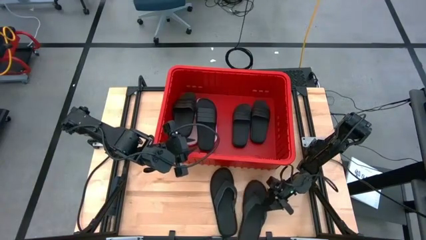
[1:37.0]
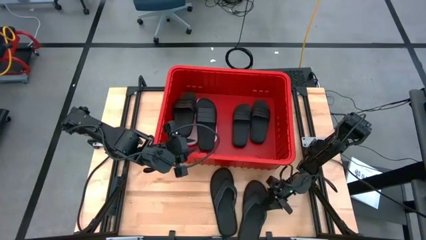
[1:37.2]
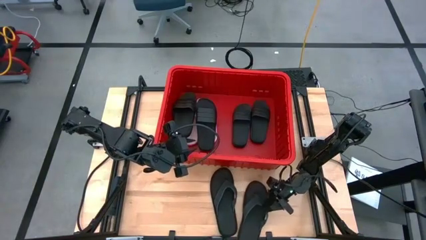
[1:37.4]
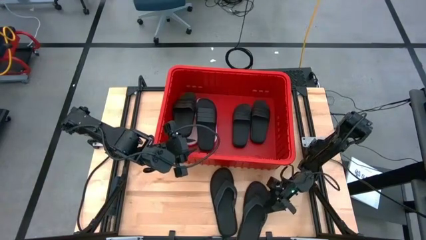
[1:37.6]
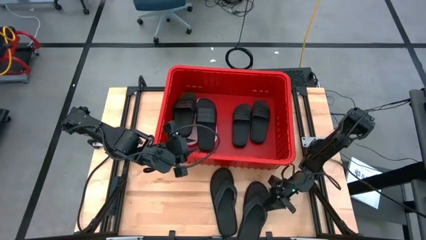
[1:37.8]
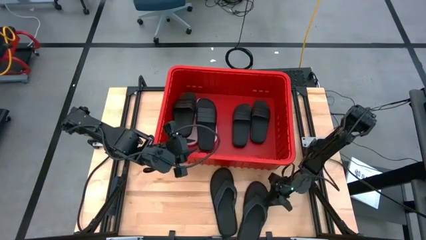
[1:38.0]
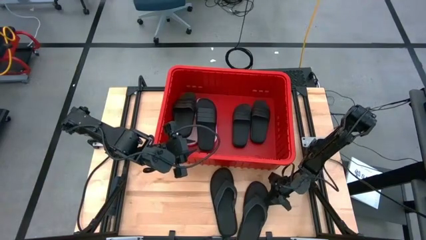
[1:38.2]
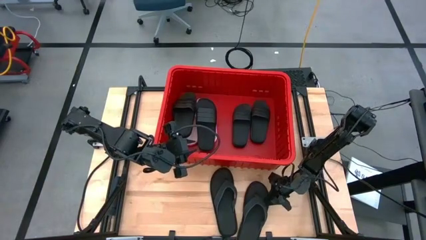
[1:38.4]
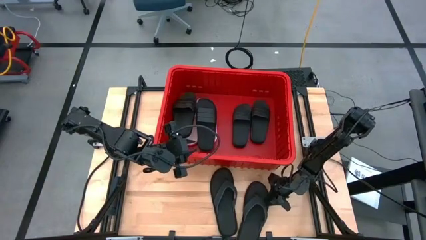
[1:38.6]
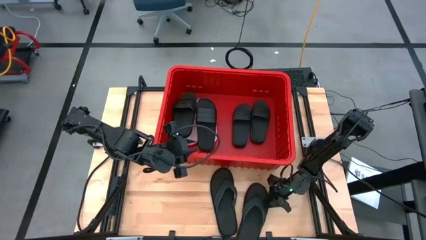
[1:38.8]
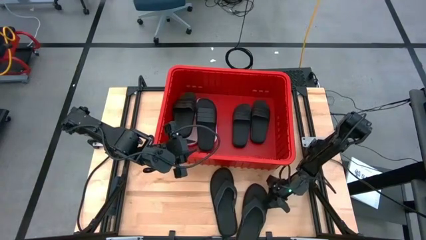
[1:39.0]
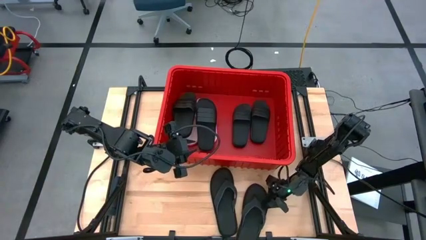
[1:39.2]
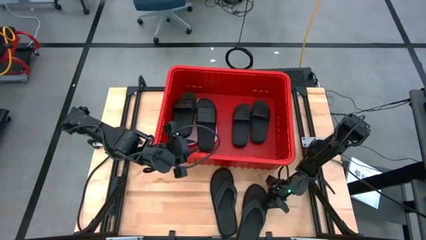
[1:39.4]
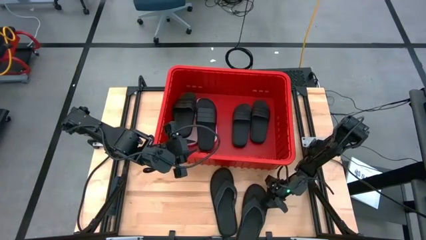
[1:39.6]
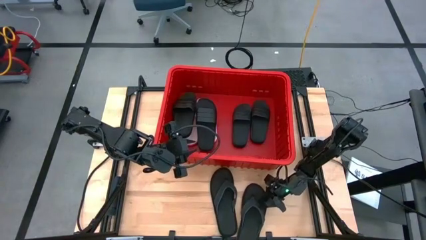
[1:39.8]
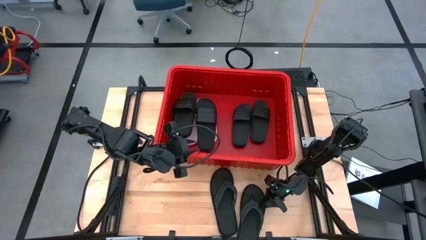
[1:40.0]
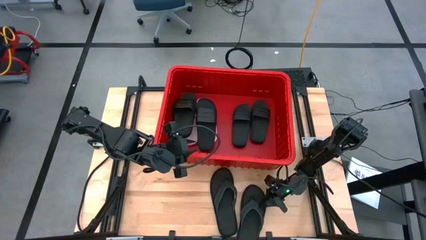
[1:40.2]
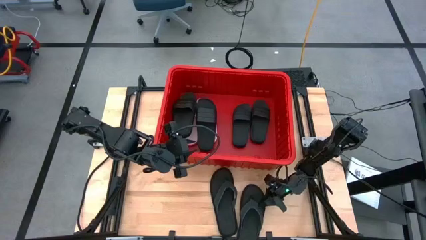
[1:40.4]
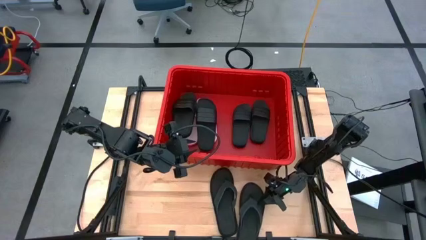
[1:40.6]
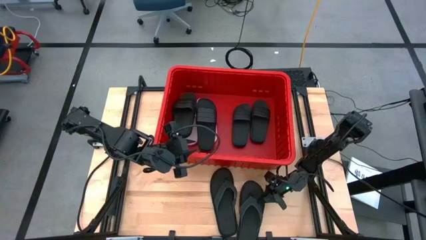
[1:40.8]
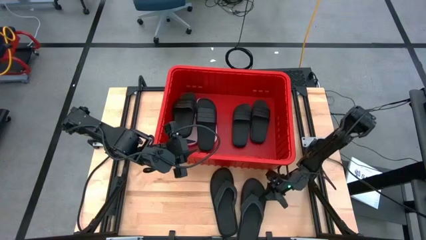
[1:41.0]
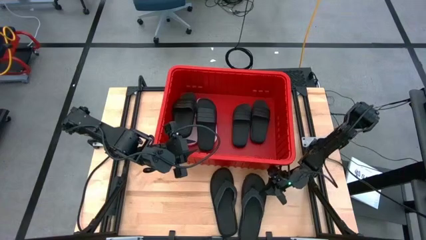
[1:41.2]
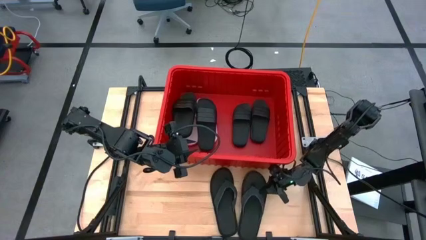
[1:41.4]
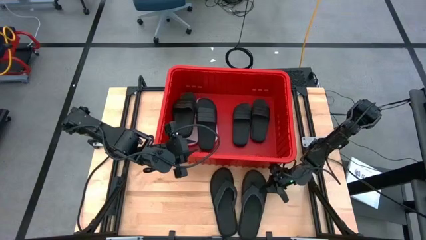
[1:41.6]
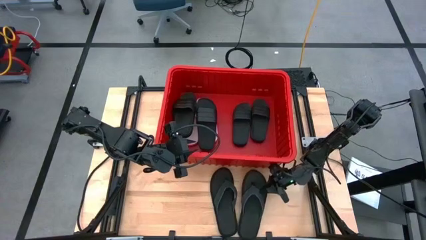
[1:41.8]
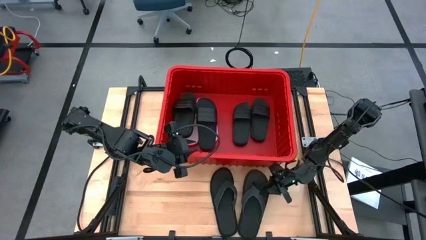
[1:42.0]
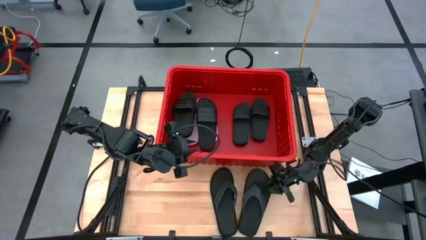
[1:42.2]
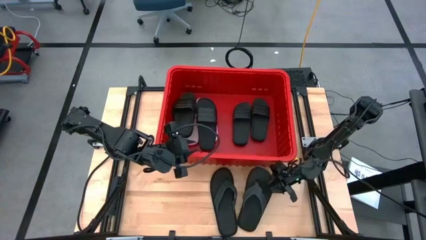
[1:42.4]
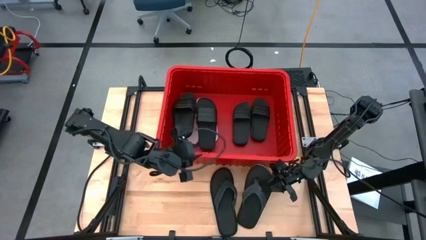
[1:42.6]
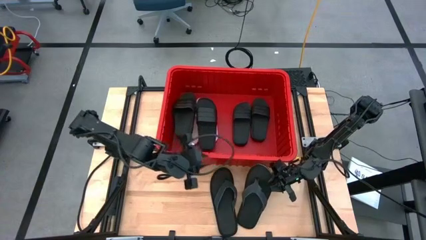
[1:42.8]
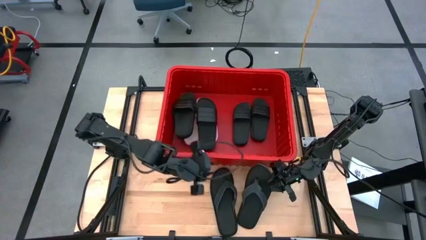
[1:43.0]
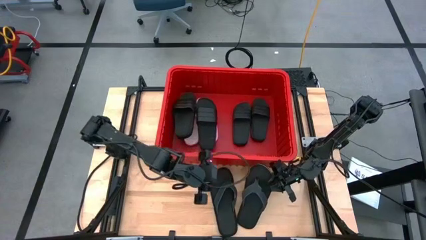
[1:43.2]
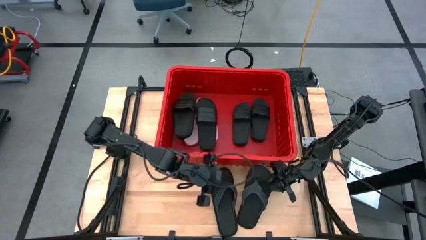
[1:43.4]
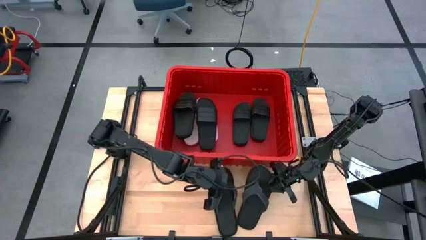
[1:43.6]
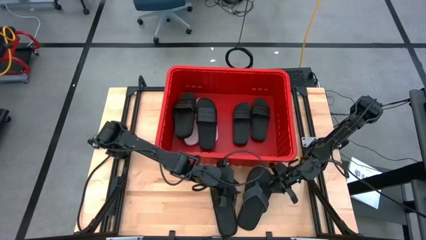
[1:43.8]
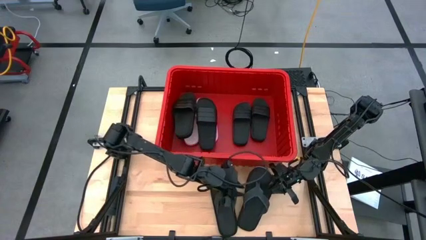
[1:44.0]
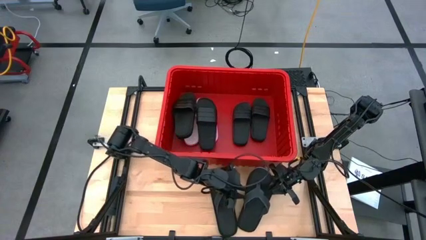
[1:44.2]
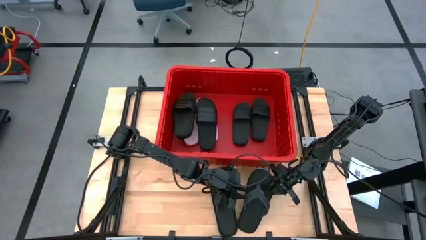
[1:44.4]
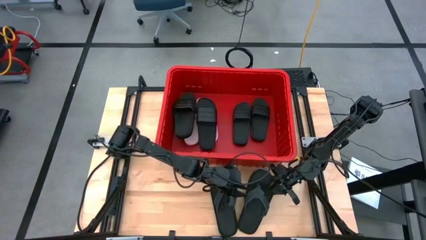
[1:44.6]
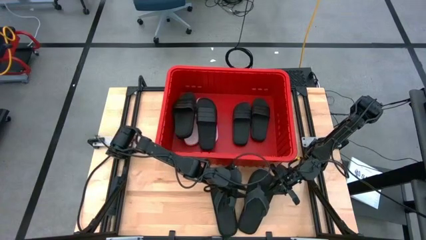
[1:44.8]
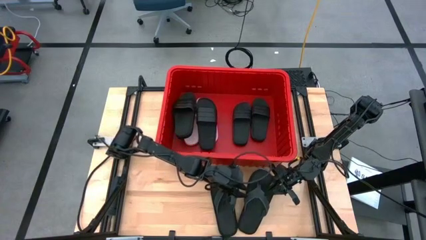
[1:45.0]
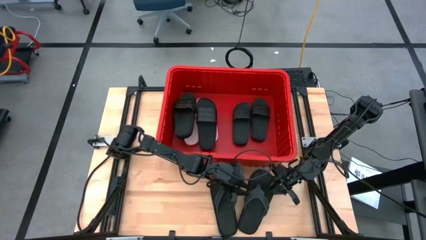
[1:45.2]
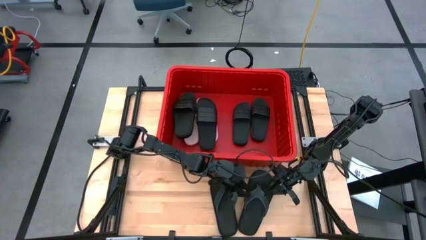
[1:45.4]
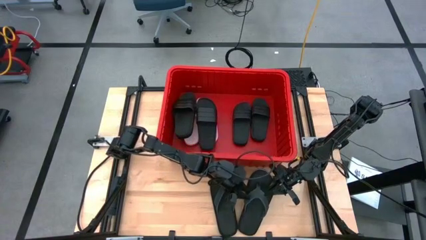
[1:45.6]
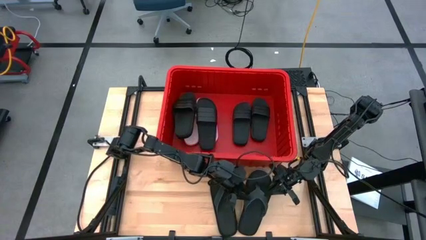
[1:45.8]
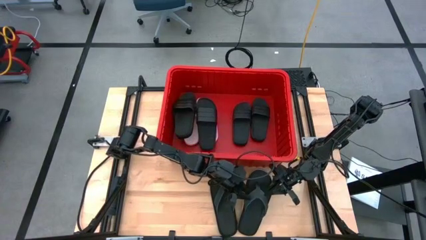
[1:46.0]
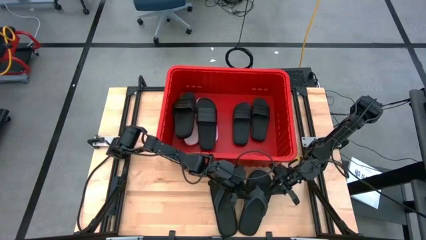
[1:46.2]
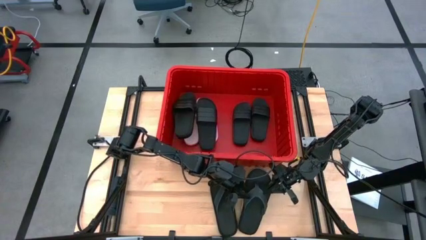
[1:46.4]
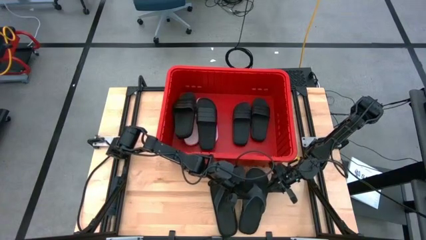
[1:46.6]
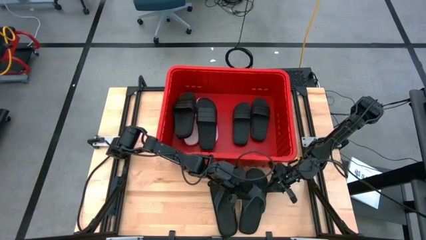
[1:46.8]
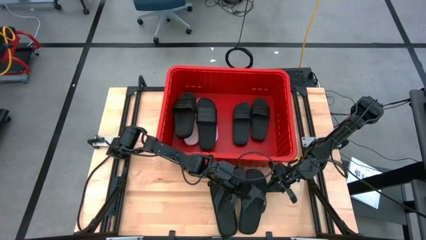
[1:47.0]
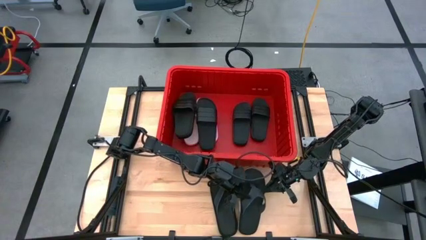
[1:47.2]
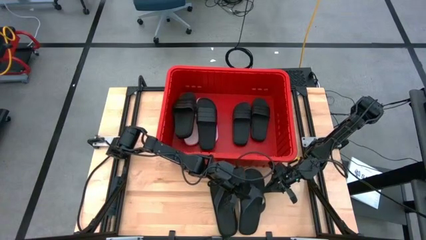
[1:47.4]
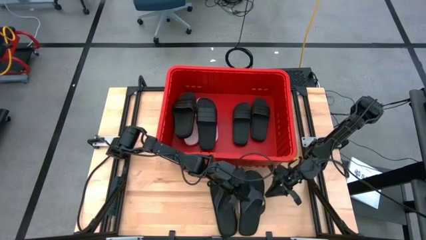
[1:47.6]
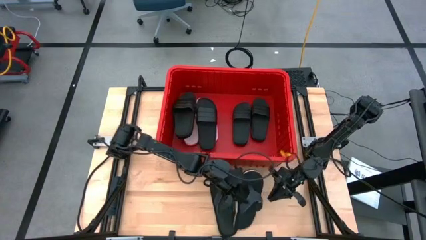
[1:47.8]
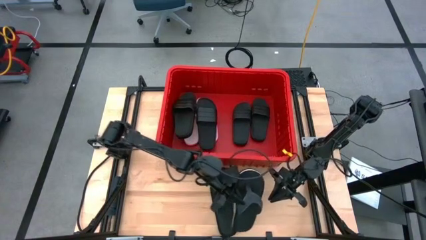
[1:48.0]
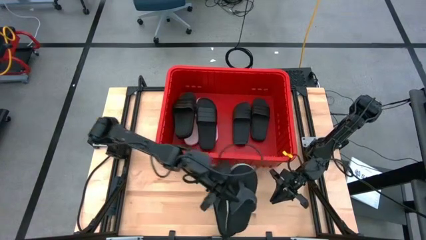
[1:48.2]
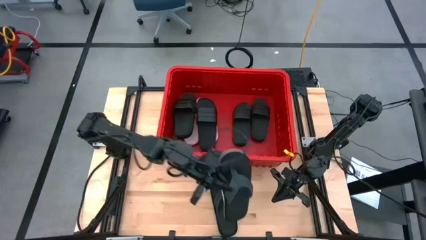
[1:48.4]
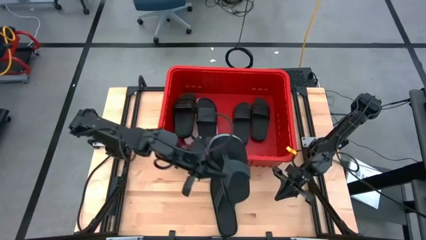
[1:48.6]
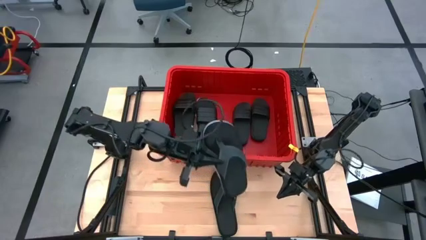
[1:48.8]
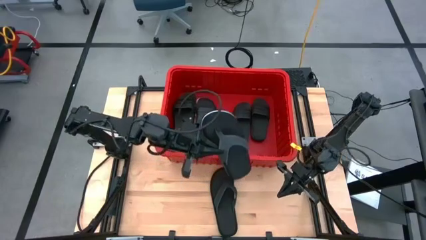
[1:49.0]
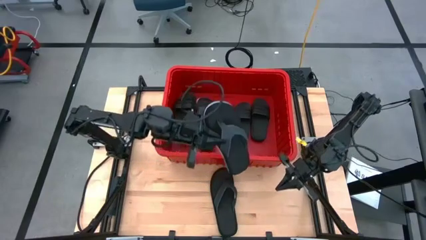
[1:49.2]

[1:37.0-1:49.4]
Task: Pick and place slides into bin
Put the right slipper into the bin

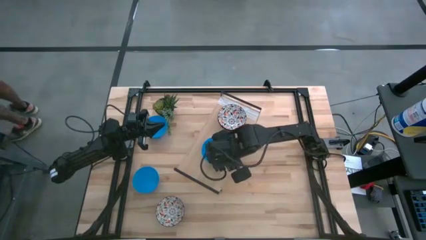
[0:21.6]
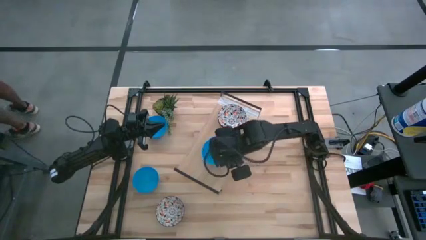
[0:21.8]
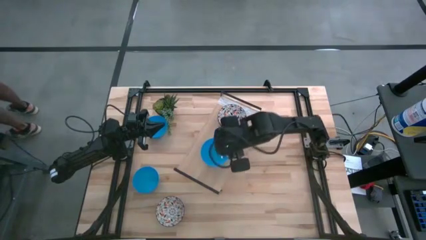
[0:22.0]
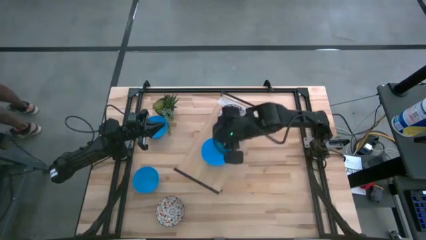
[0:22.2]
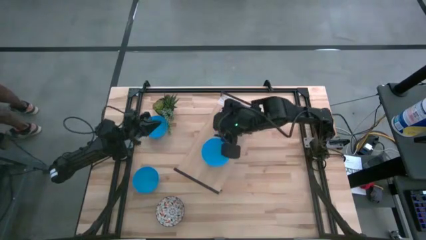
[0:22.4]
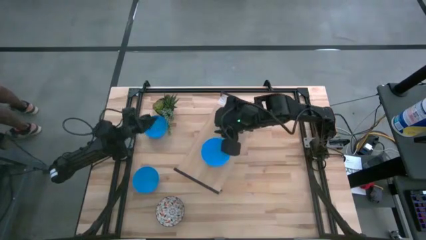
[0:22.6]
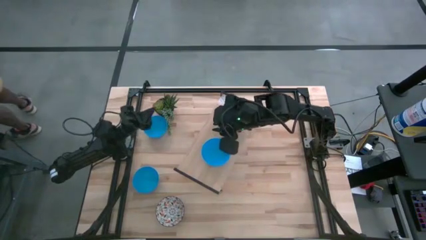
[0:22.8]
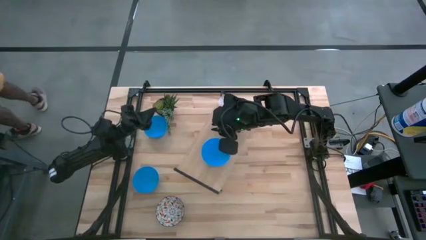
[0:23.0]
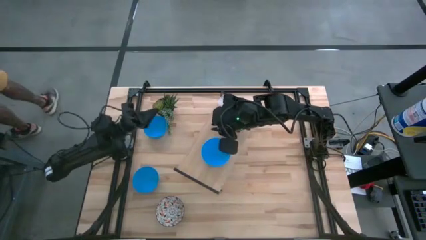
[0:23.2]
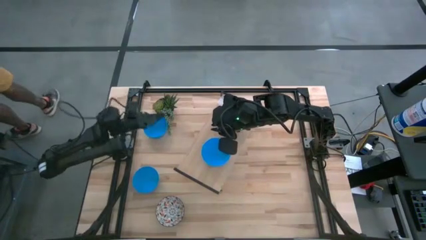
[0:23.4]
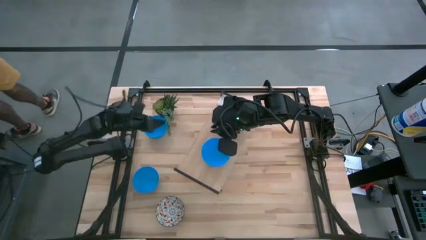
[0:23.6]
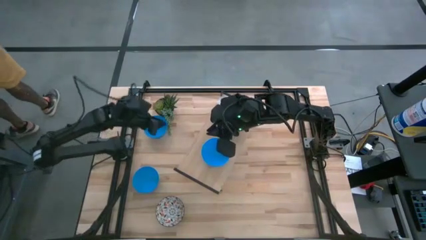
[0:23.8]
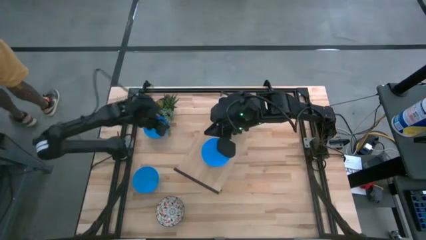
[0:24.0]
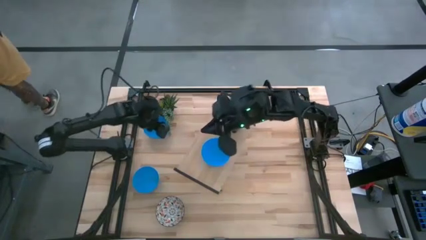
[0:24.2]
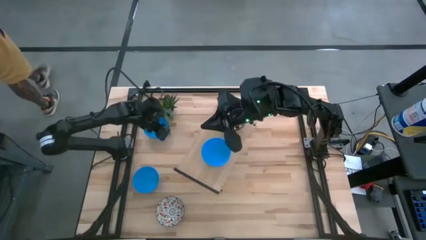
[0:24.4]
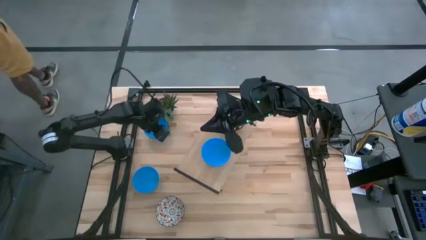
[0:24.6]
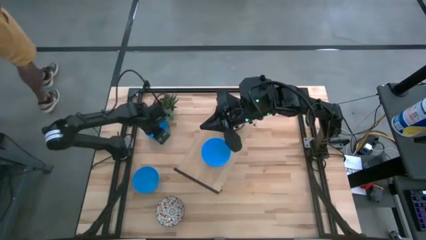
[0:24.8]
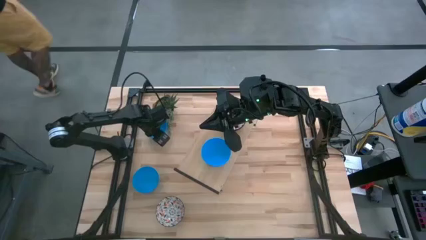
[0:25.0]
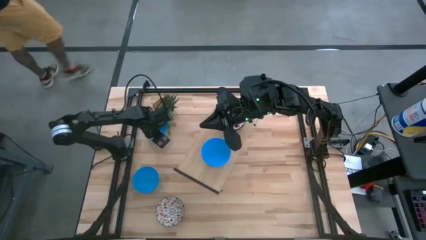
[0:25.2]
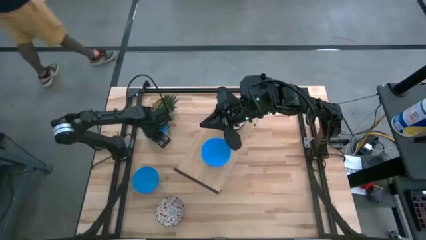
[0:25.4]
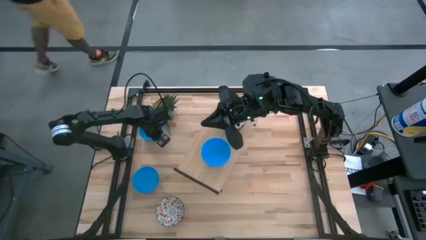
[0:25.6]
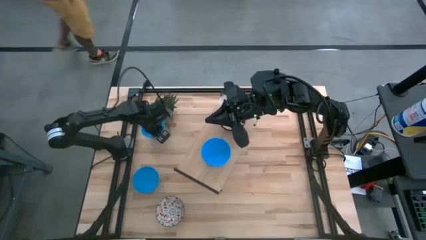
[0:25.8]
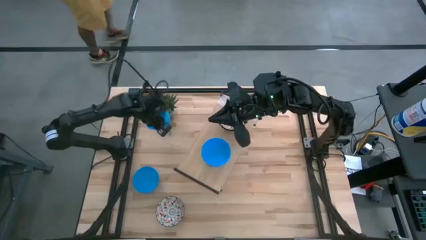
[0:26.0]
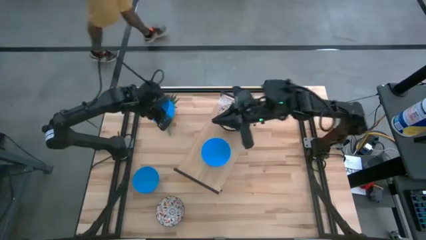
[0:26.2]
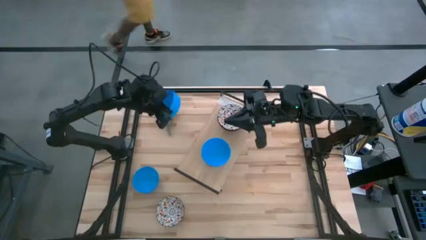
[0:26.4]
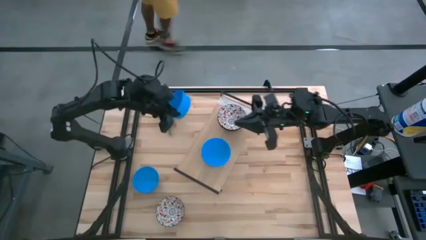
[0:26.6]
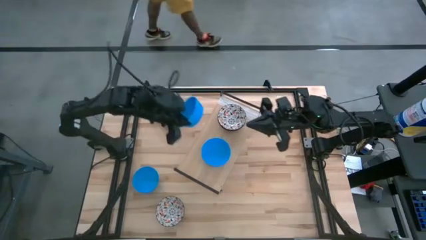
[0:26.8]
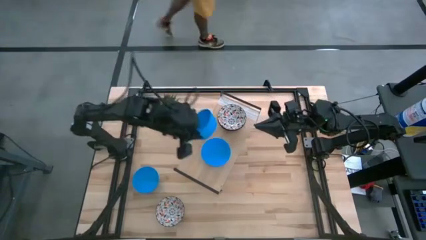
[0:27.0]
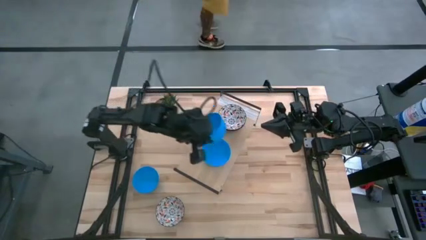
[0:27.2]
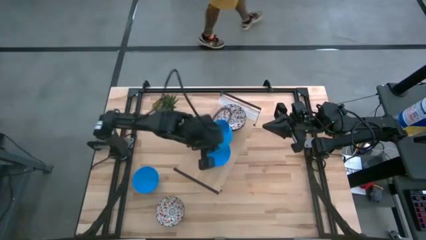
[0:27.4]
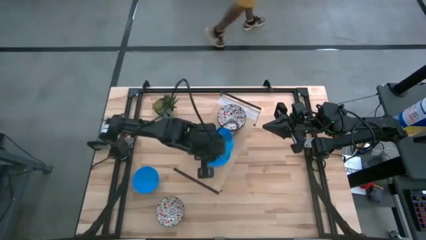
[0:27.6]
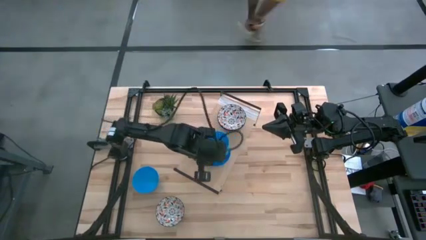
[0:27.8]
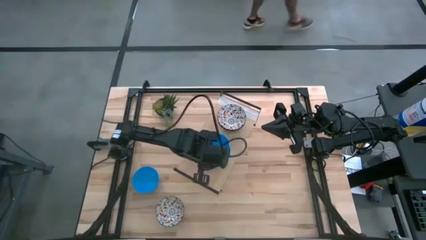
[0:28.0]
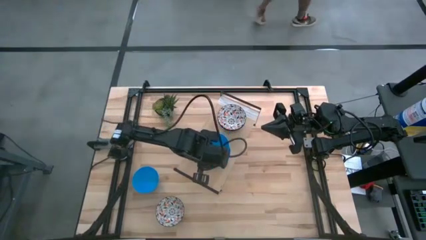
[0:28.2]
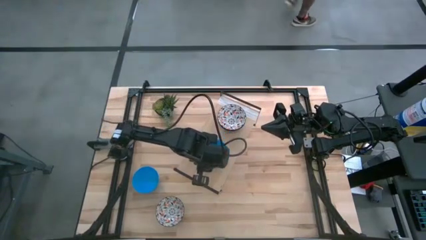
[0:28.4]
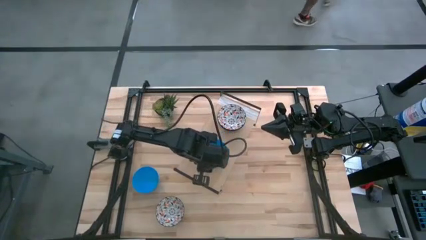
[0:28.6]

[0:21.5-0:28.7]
Task: Pick & Place Mini bowls
Stack the top blue bowl on the blue bowl on the shelf
